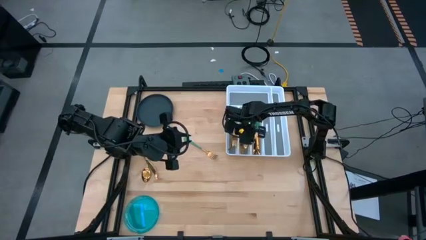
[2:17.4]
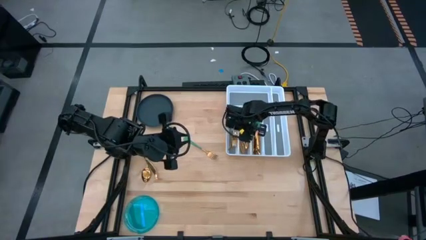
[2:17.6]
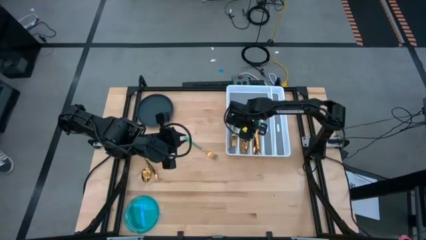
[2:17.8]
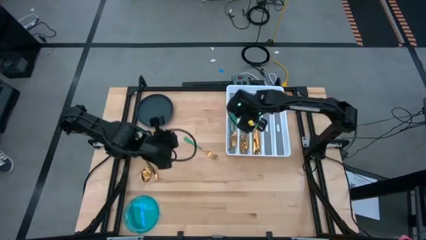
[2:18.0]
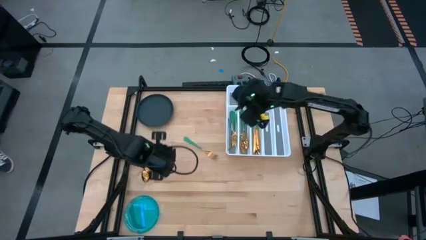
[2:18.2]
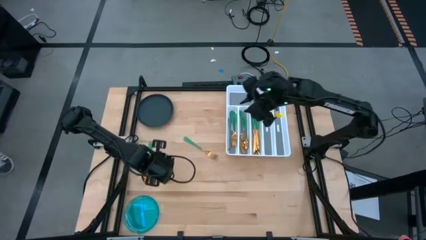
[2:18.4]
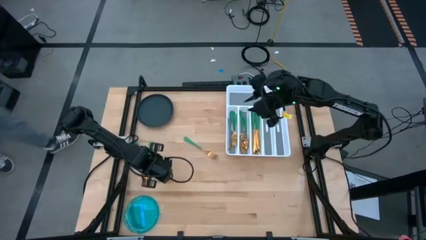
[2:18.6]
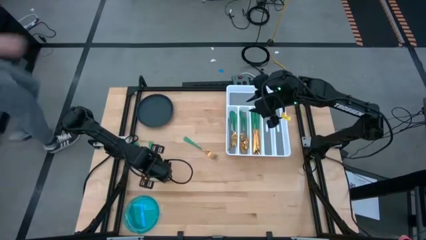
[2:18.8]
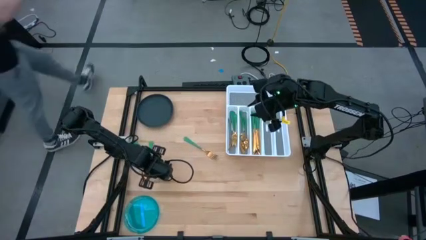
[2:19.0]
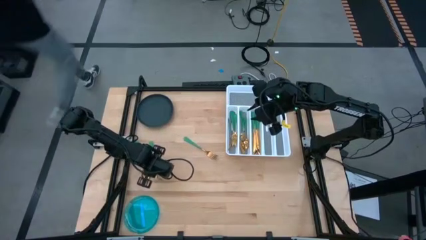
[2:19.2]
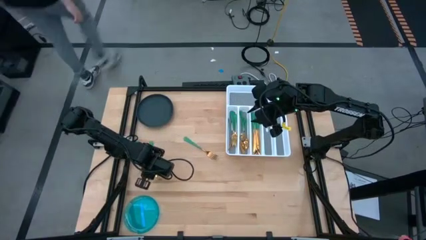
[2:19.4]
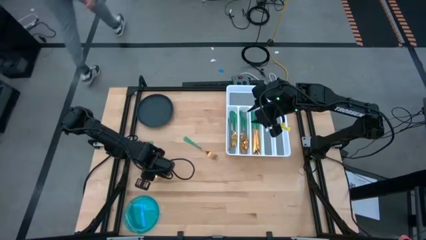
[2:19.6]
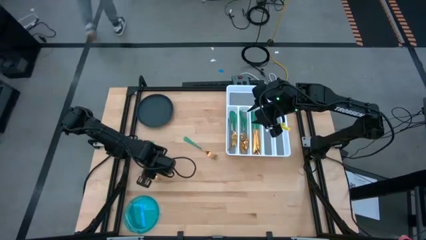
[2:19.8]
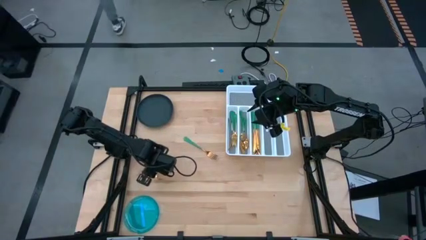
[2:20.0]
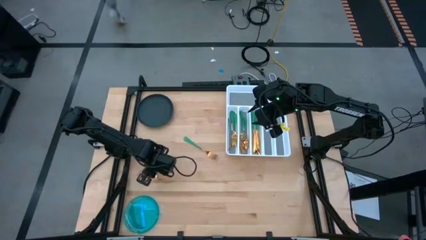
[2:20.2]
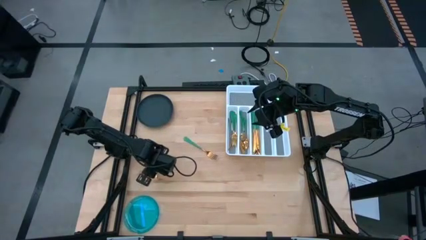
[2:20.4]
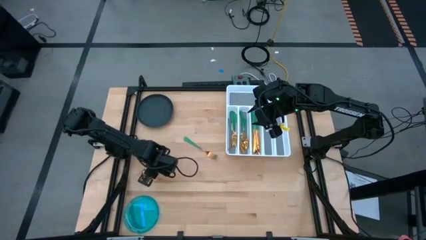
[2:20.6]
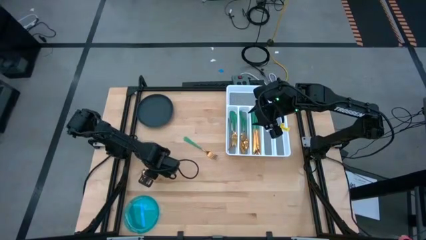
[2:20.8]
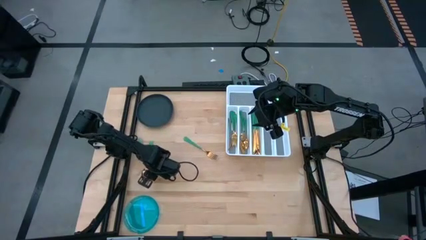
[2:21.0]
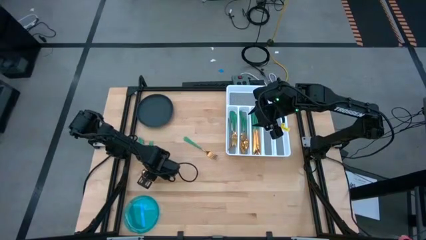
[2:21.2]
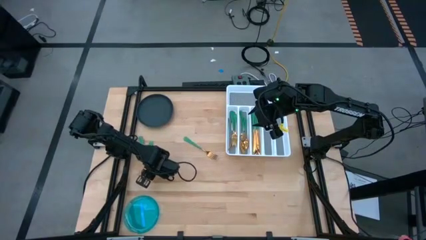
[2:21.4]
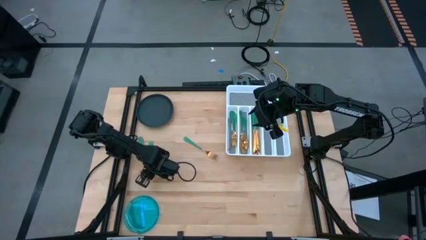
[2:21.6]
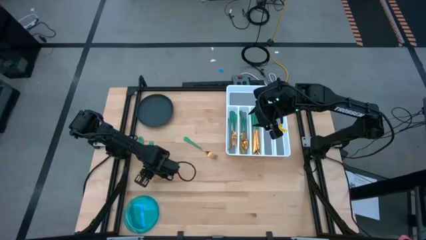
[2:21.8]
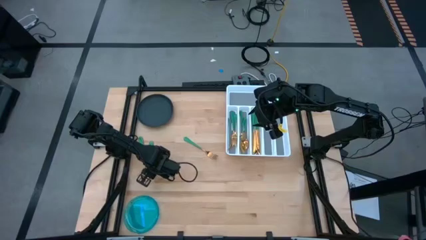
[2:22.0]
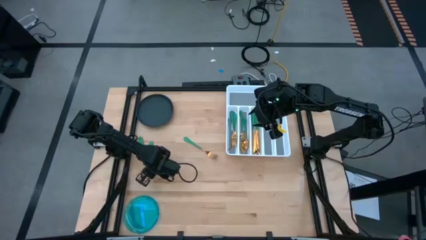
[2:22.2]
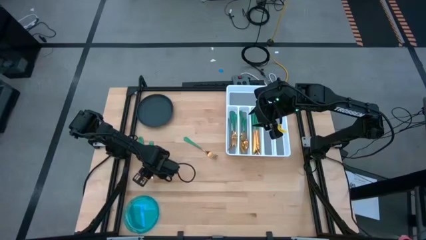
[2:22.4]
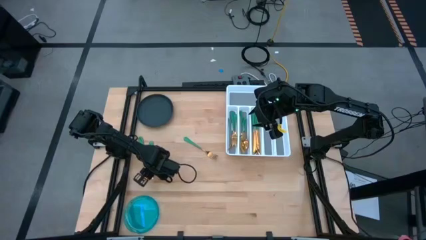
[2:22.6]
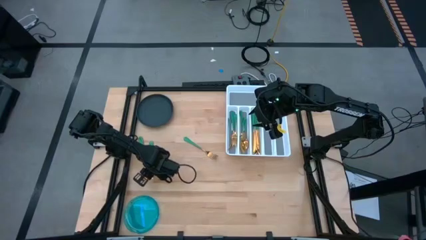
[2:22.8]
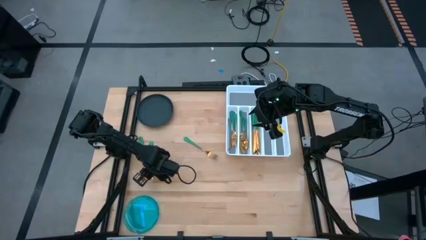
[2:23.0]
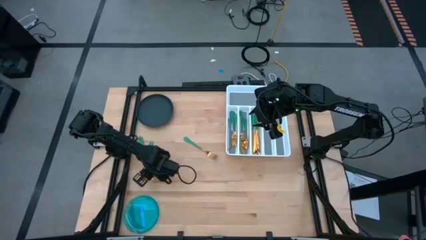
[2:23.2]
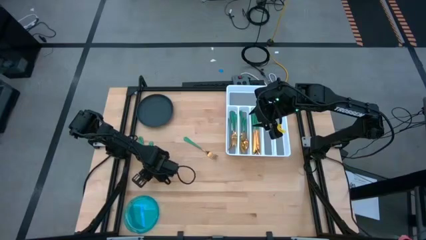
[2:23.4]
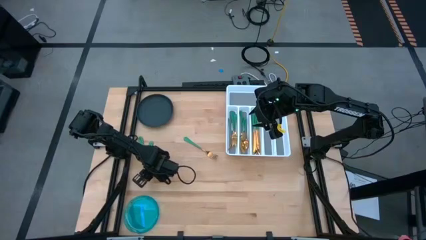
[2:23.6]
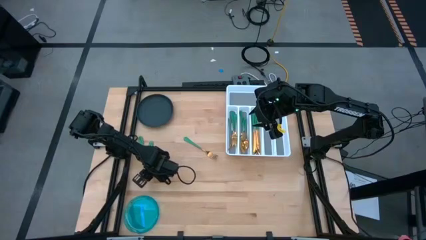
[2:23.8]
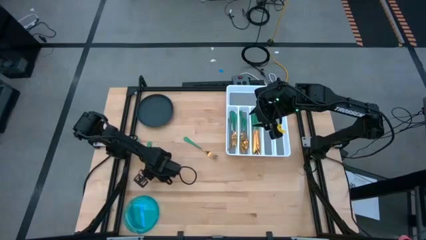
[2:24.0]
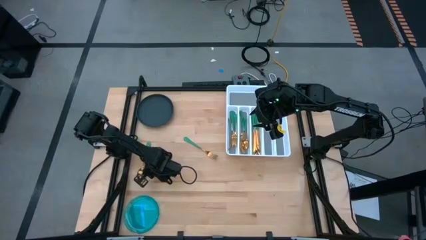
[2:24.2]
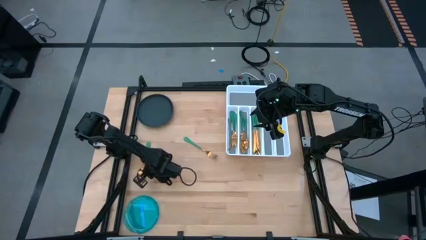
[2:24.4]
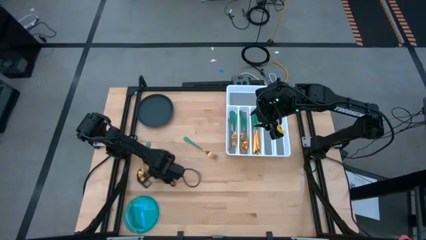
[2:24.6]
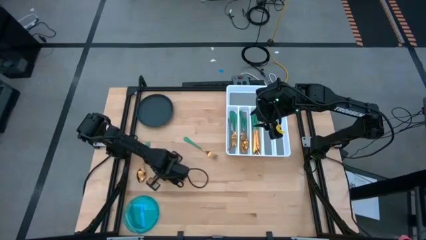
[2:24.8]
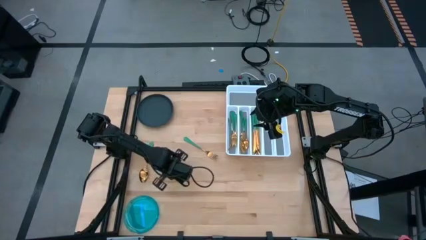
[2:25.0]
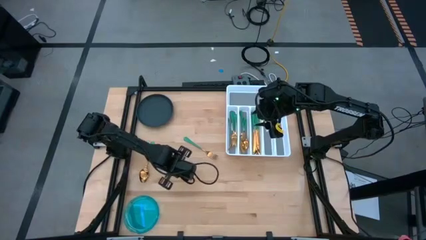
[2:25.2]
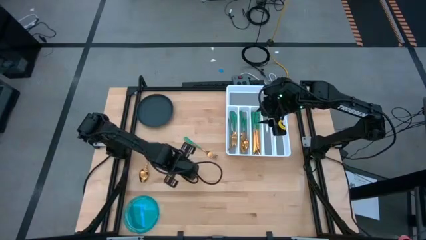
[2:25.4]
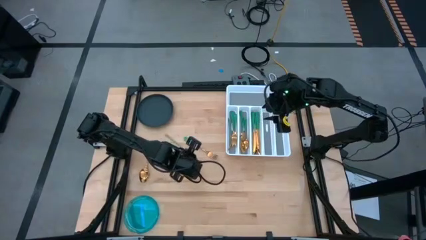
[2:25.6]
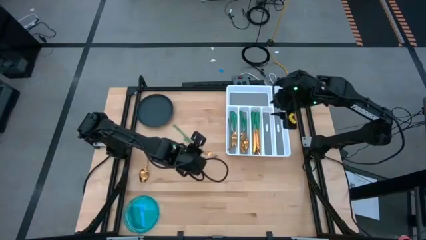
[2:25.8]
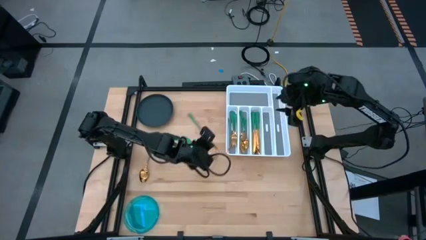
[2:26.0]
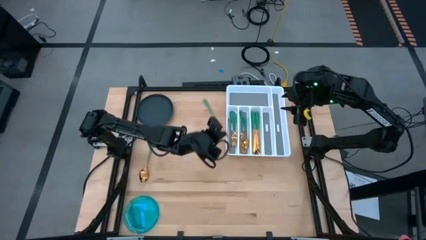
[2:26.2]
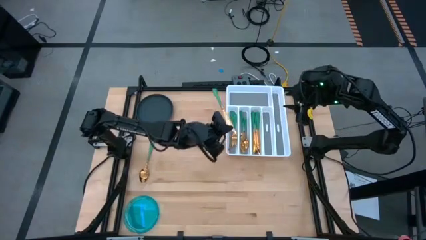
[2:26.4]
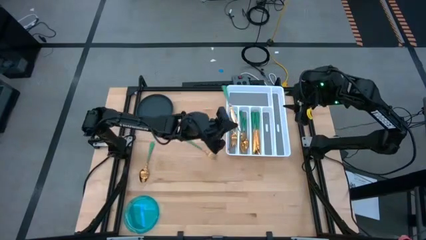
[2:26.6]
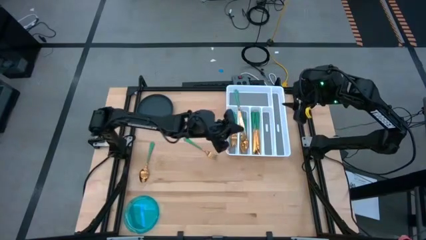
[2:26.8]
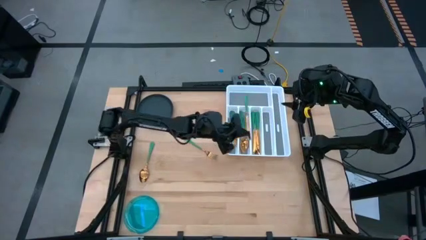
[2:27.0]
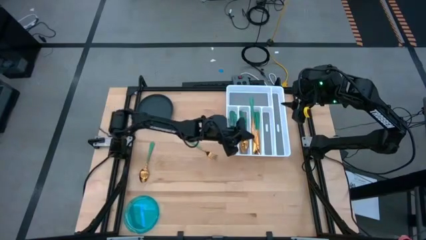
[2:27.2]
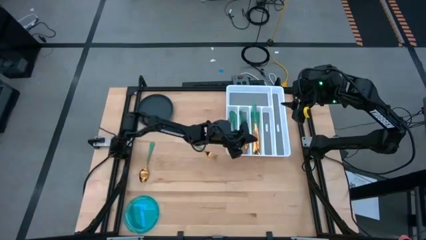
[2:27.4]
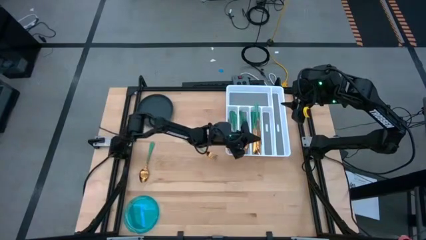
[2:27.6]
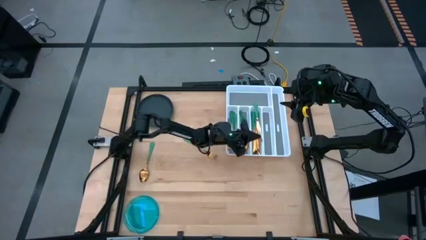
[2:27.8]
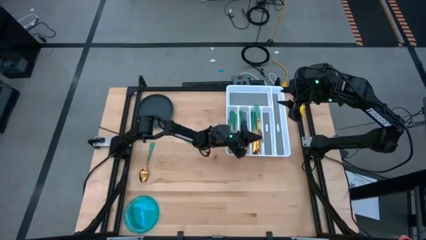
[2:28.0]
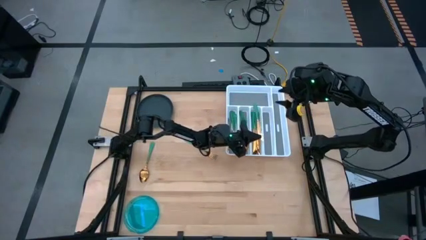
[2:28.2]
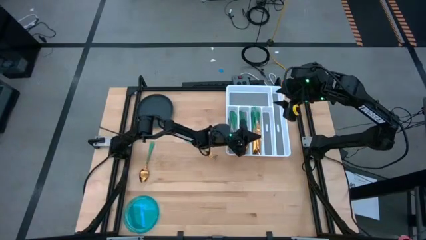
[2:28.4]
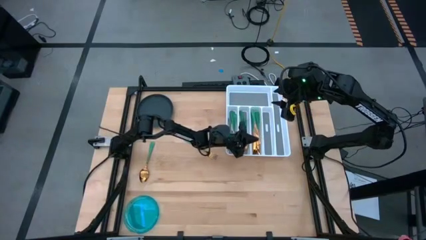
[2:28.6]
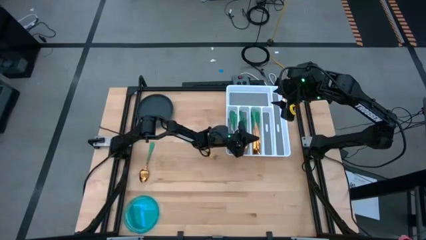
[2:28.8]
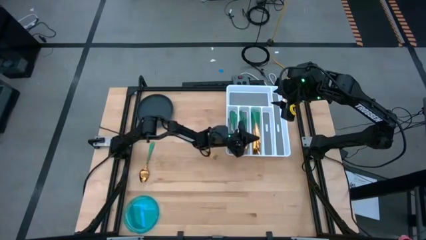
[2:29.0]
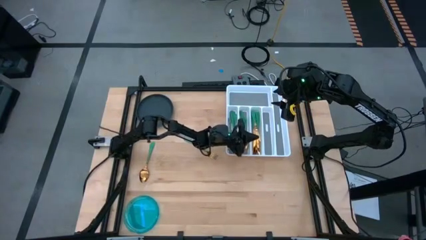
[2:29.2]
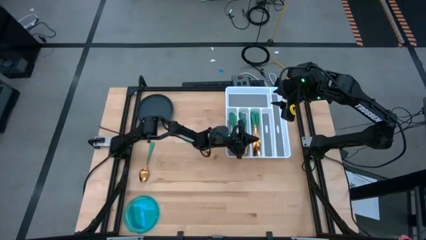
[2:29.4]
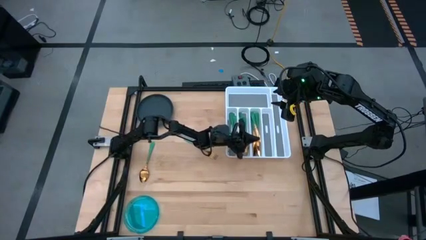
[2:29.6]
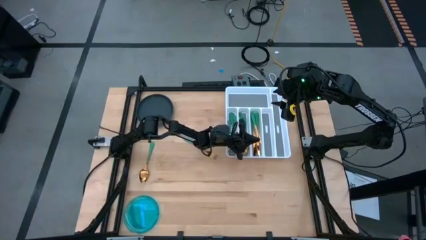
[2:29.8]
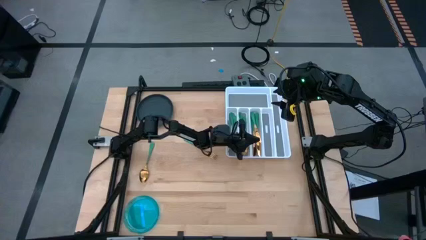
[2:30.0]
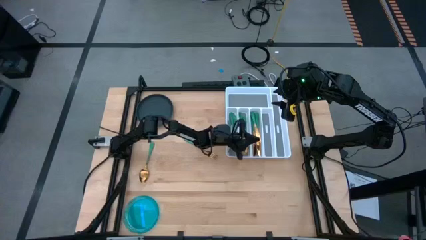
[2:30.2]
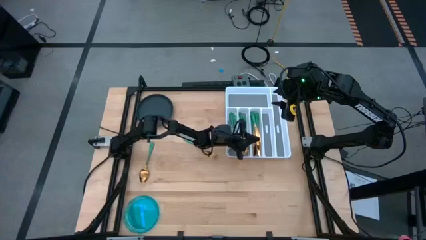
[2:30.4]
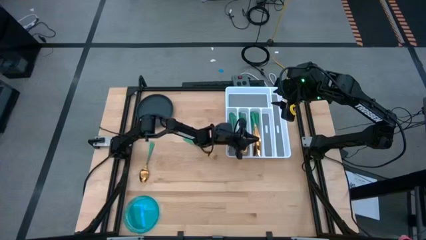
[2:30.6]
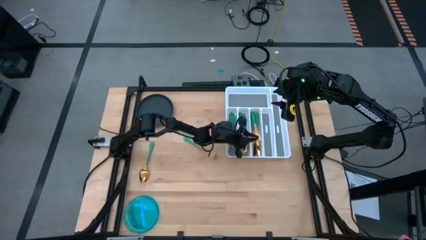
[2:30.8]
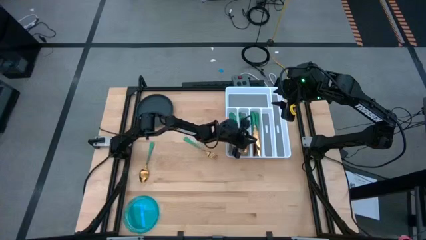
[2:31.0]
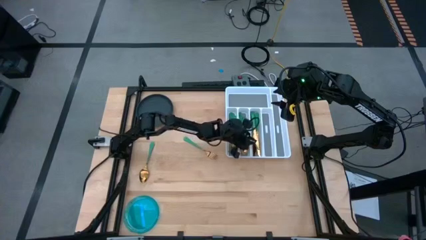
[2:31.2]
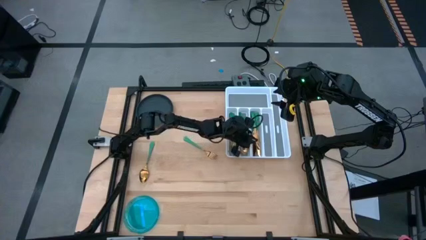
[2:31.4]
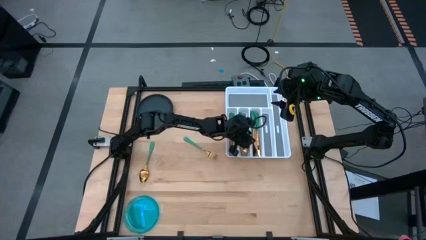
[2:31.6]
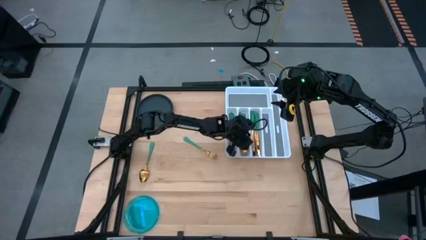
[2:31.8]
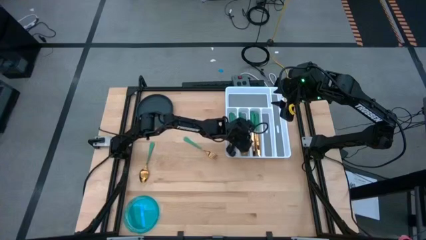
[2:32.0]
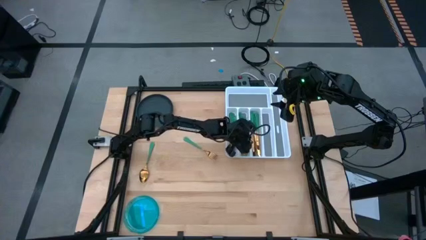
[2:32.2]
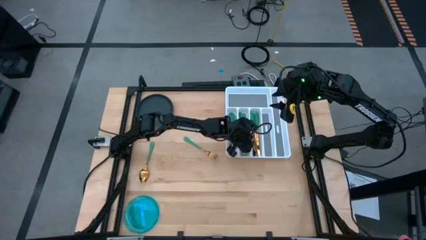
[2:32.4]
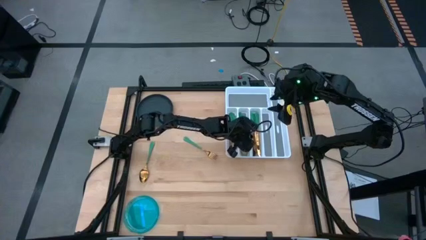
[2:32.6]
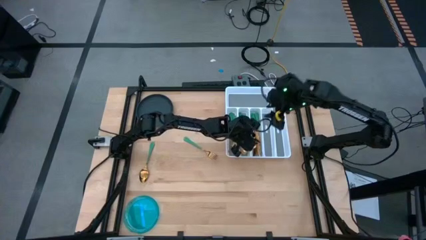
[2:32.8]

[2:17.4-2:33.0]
Task: Sort silverware
Put the green knife into the white silverware organizer
